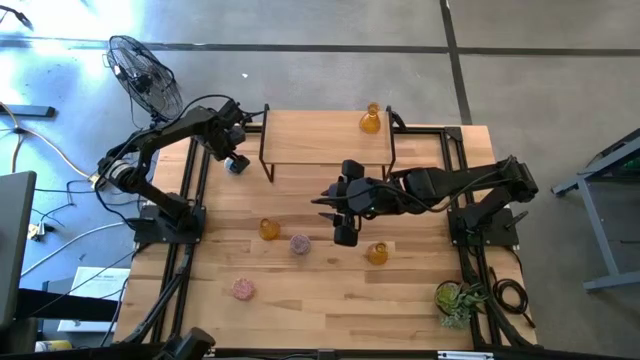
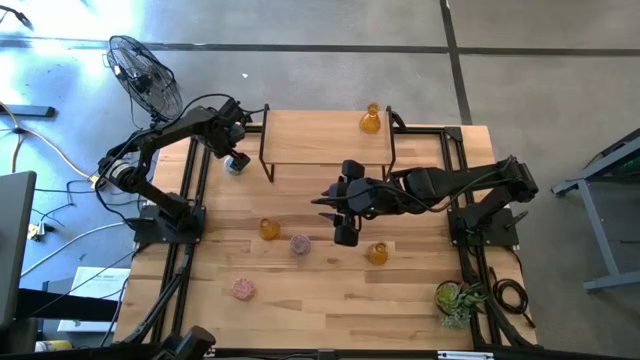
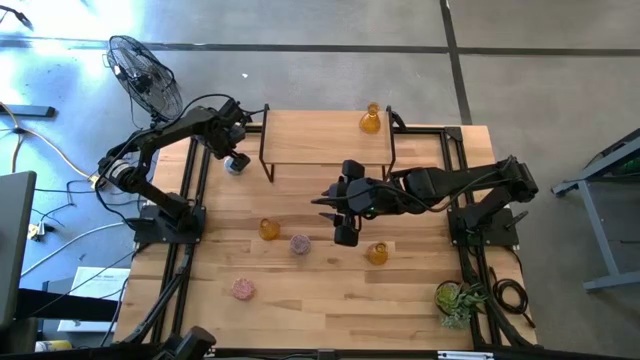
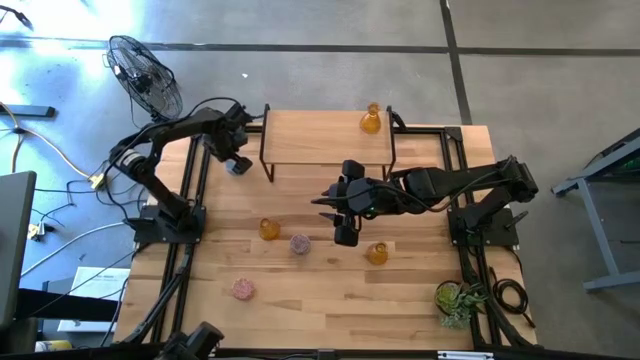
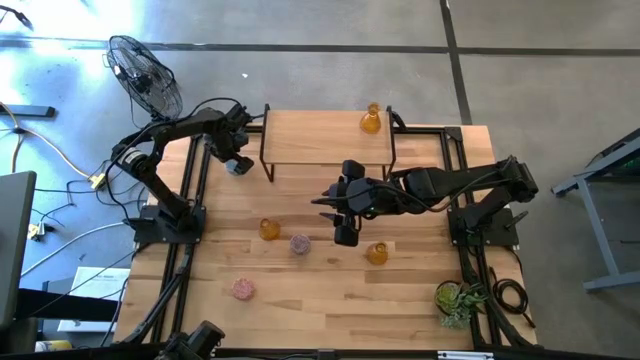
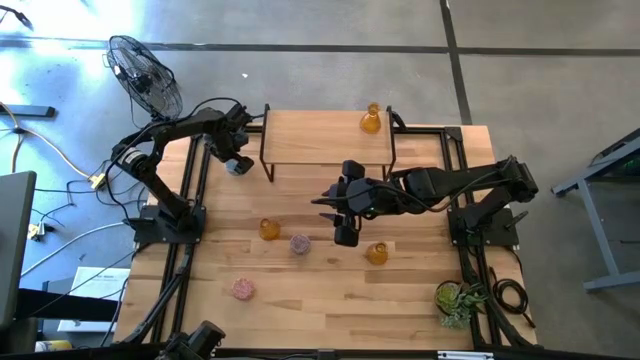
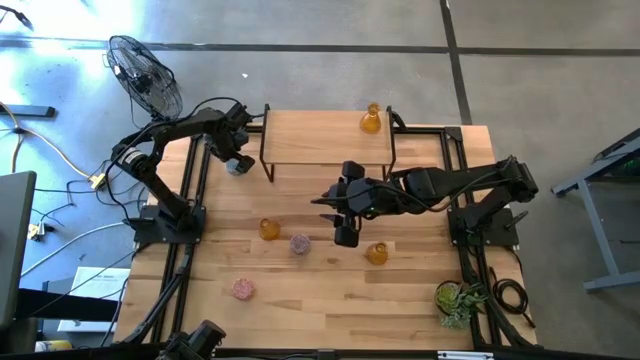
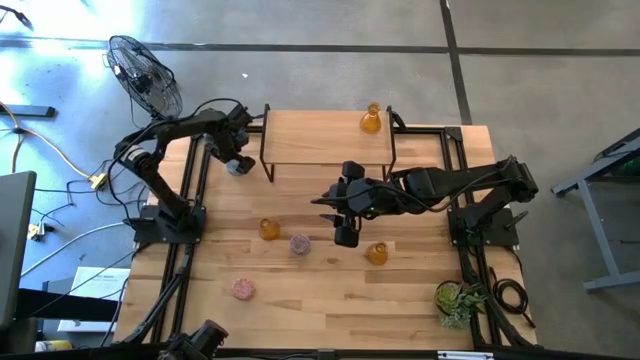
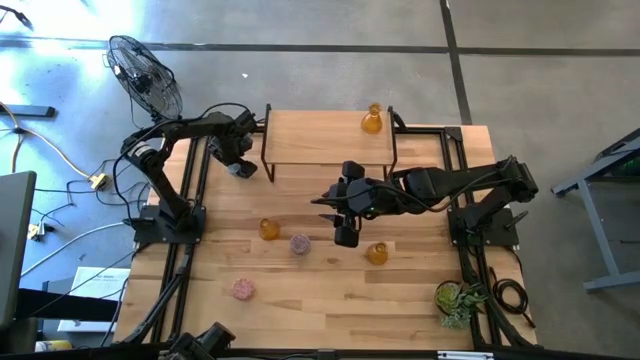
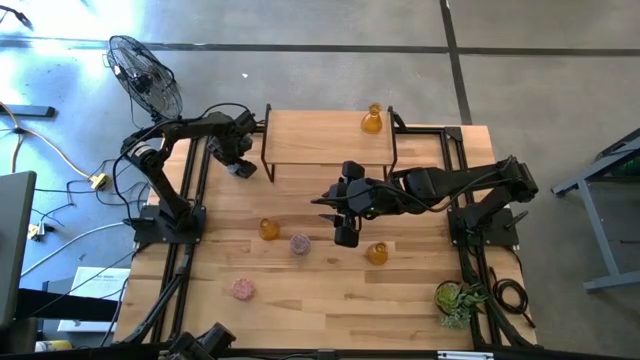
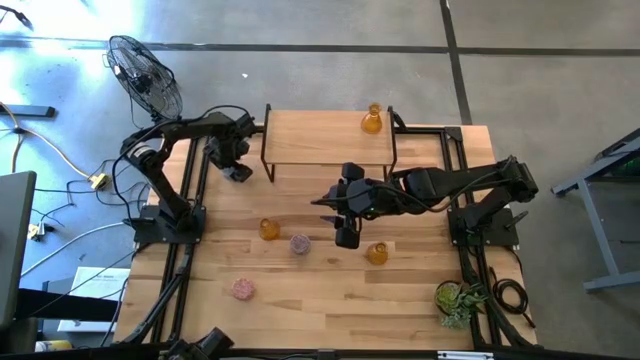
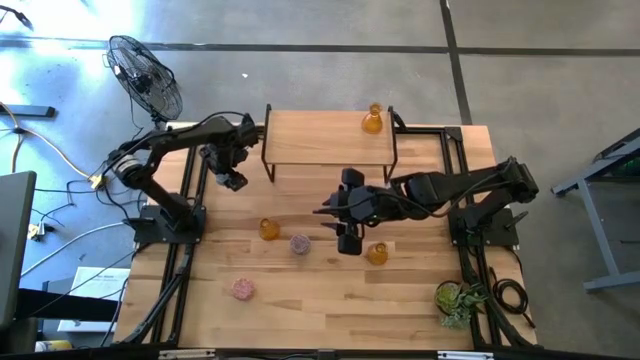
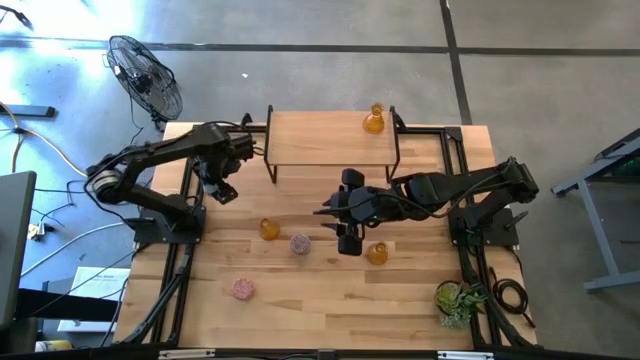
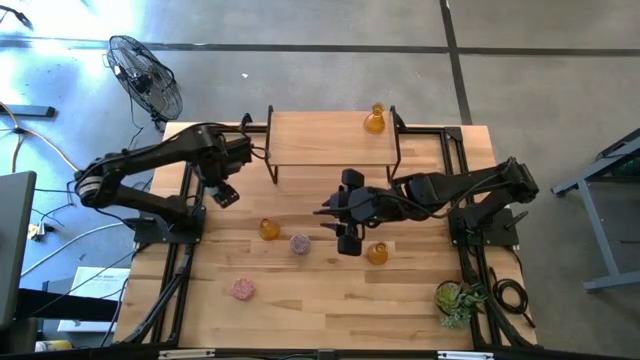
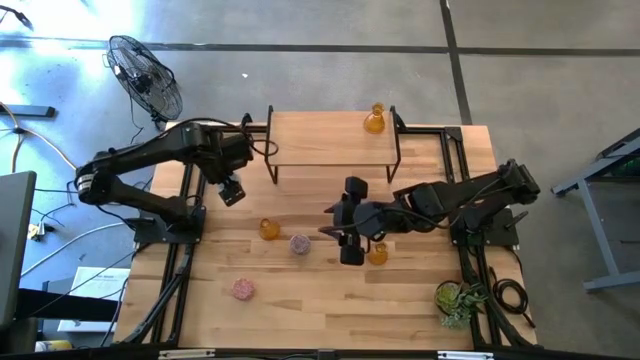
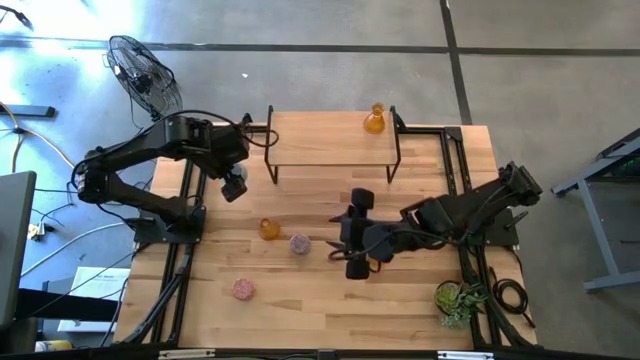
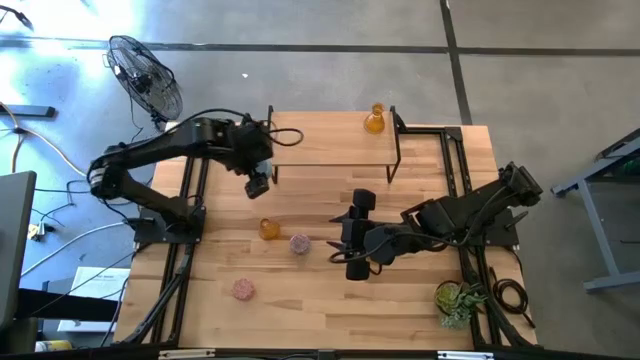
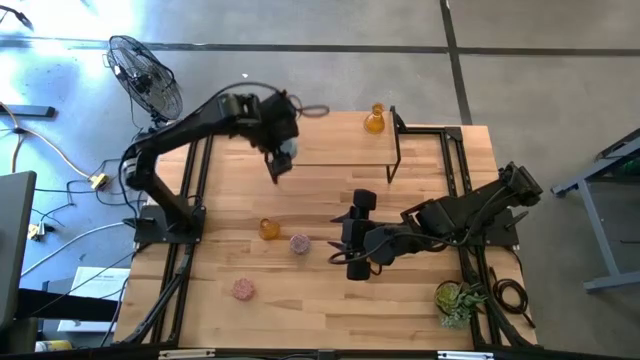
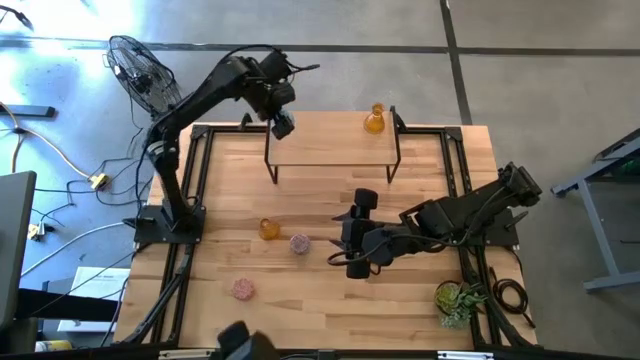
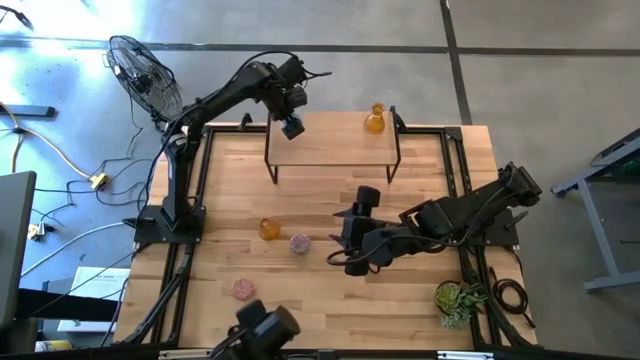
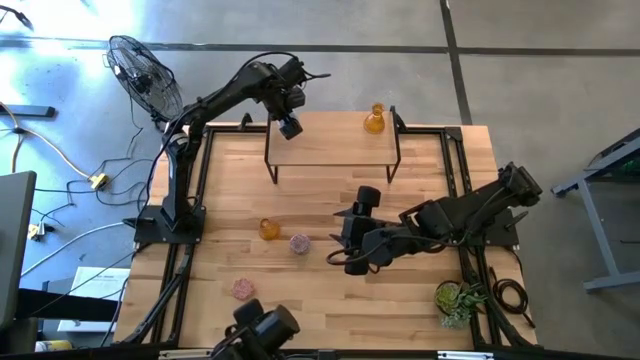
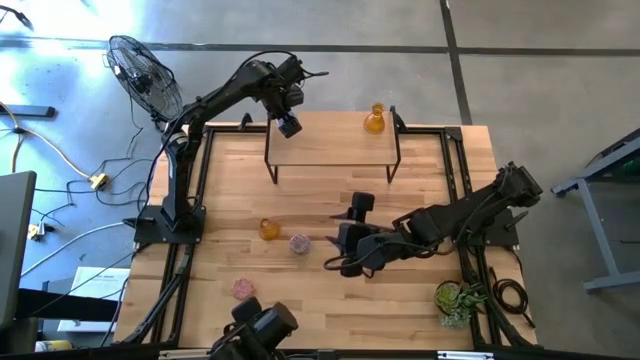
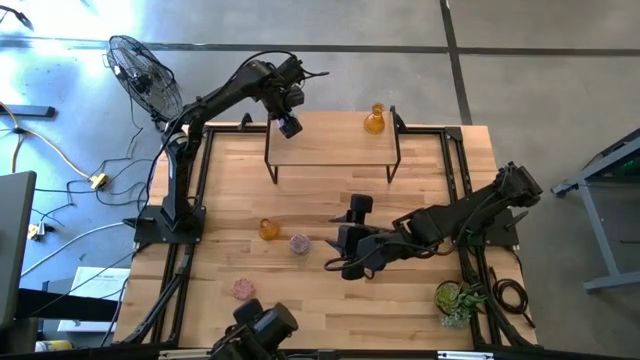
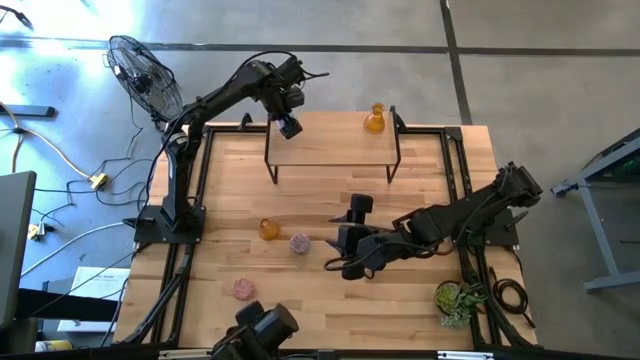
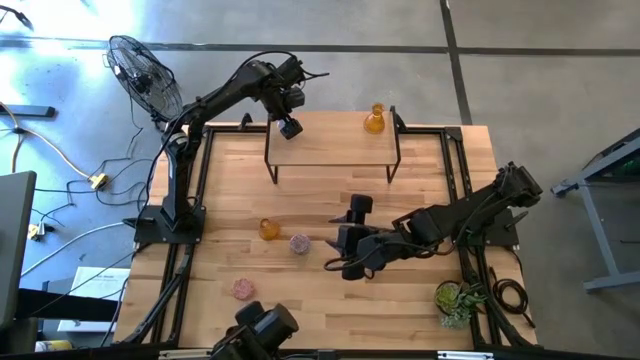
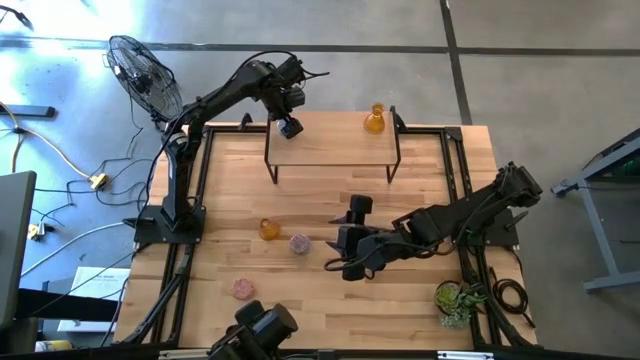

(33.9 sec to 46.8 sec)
Task: Pick & Place candle stick holders
Put the blue patterned candle on the shelf
